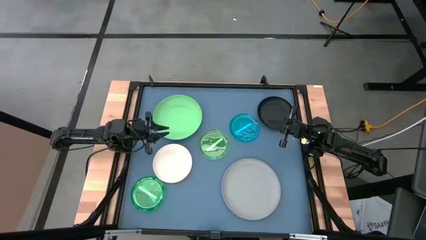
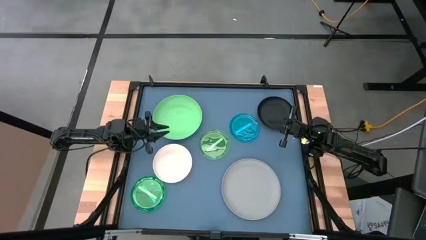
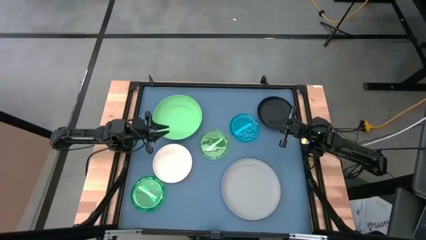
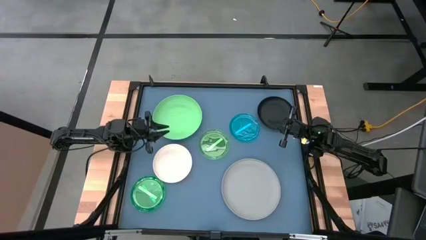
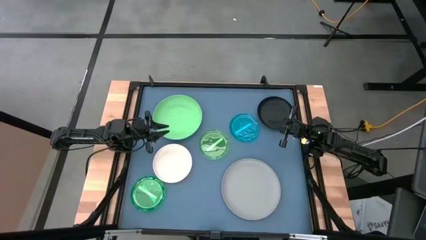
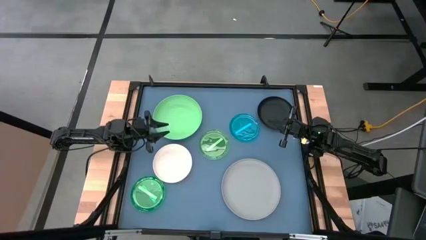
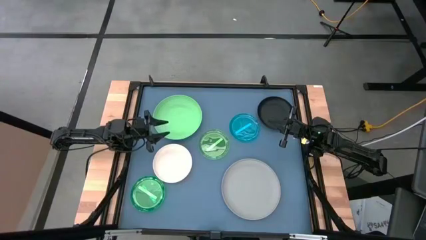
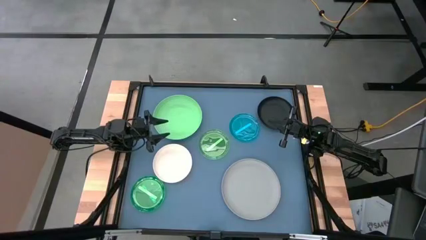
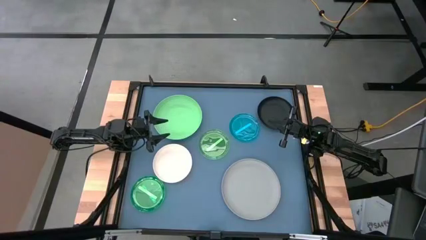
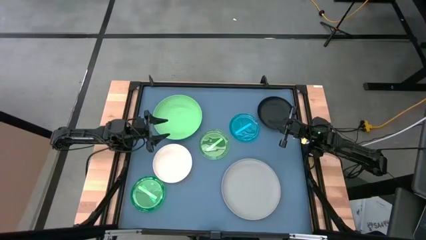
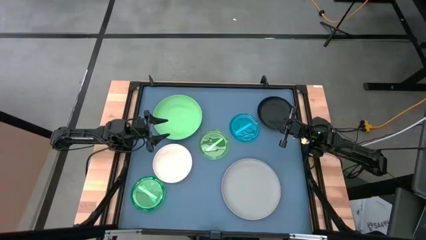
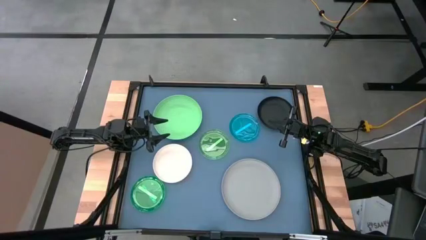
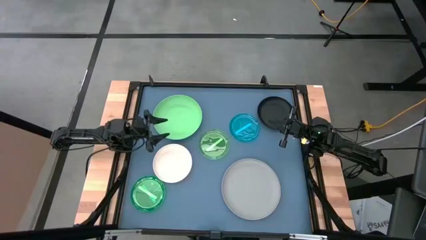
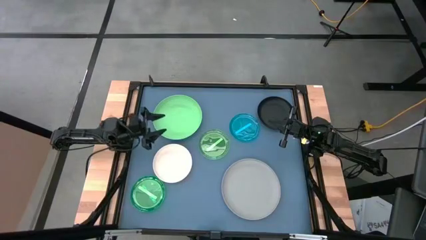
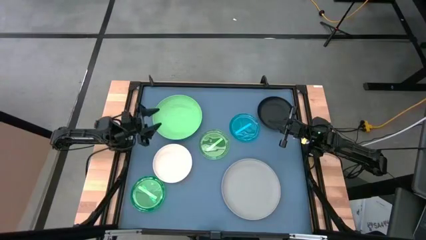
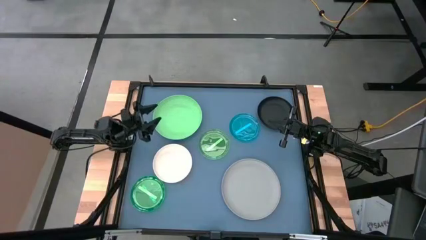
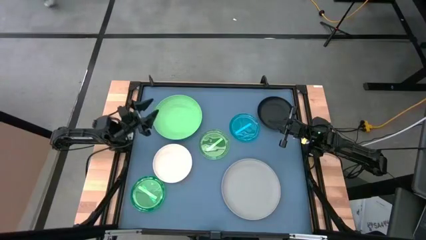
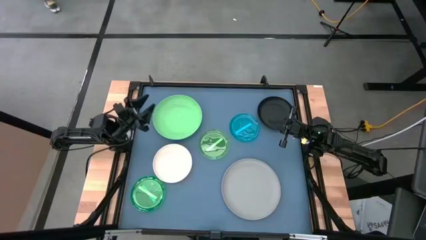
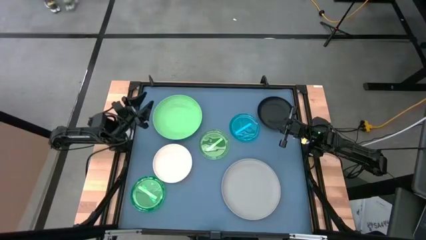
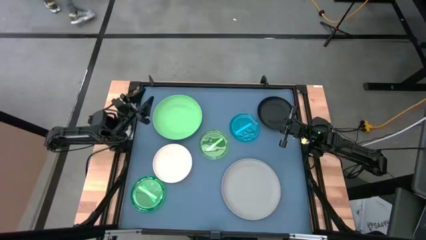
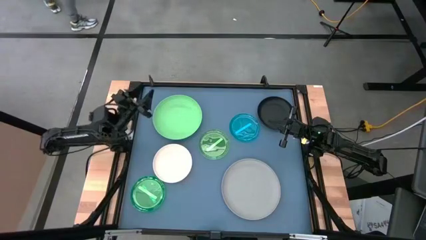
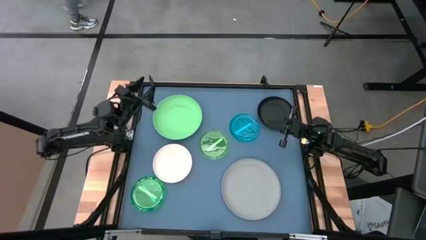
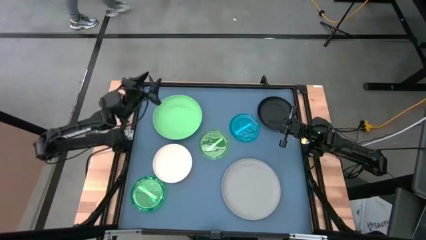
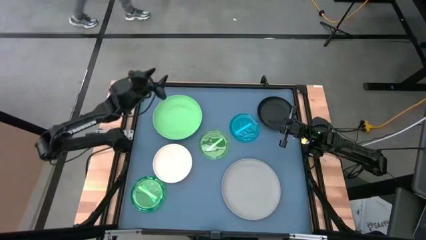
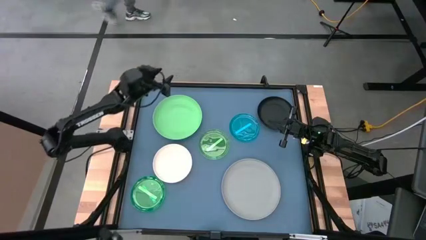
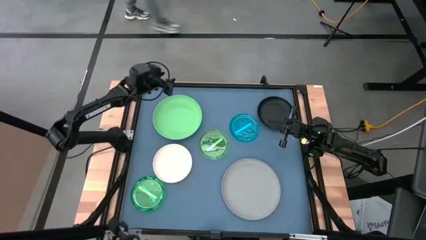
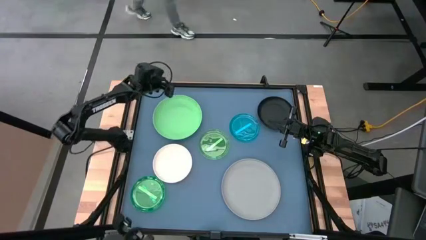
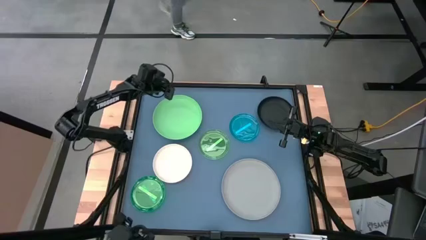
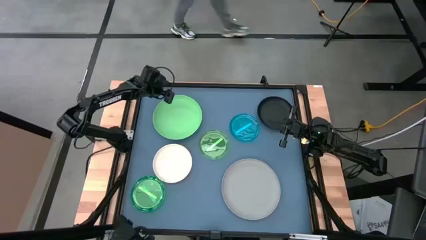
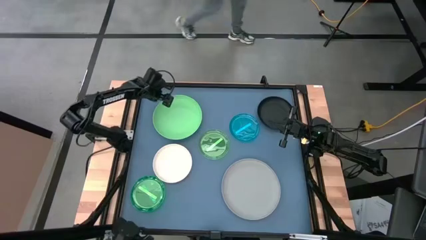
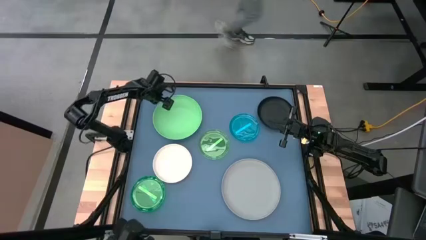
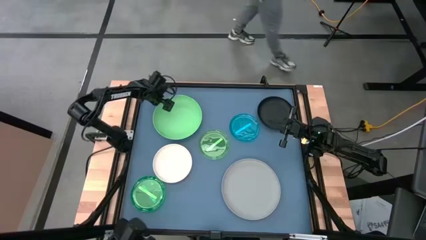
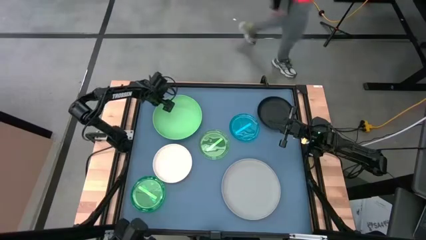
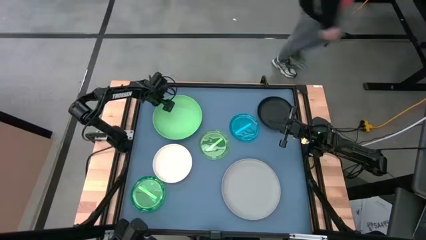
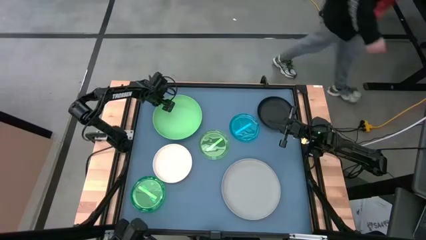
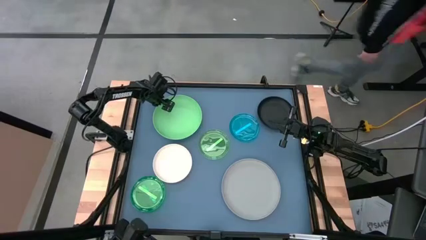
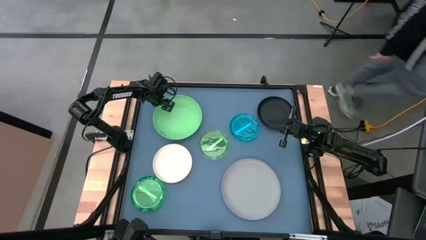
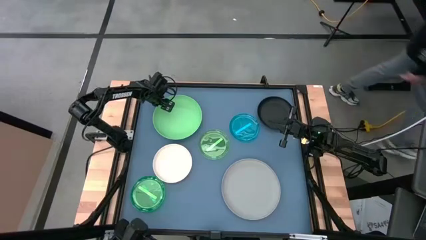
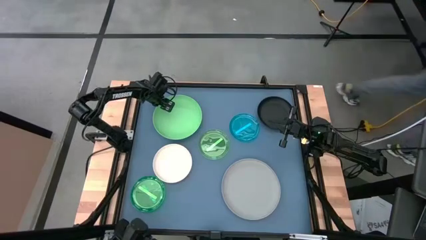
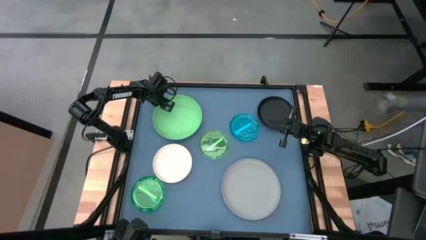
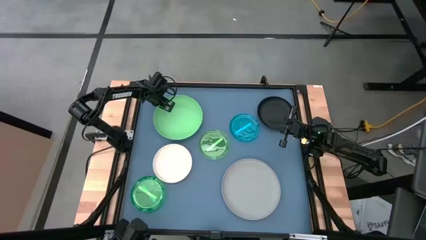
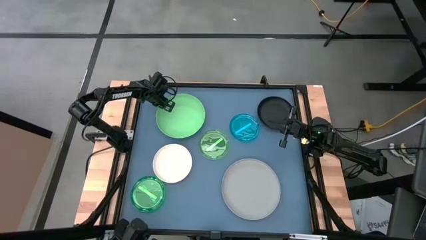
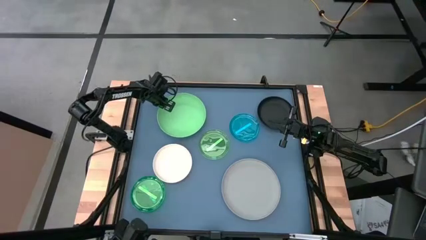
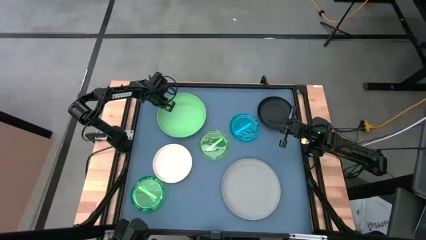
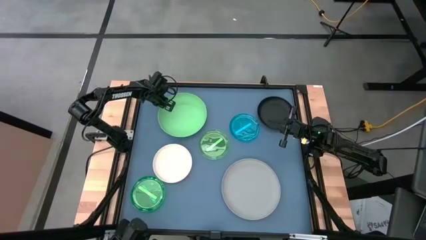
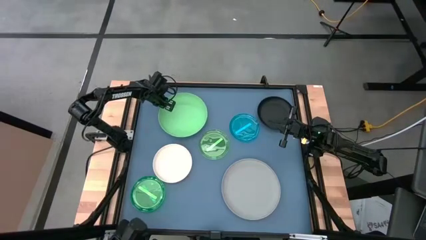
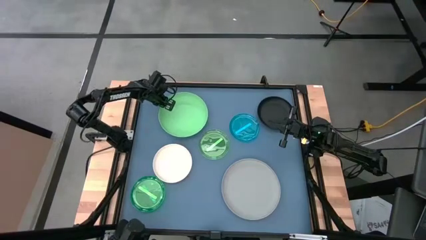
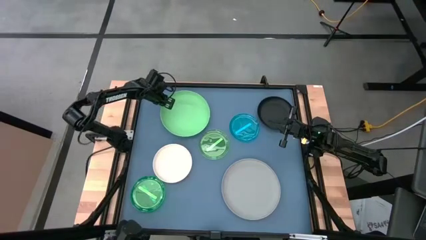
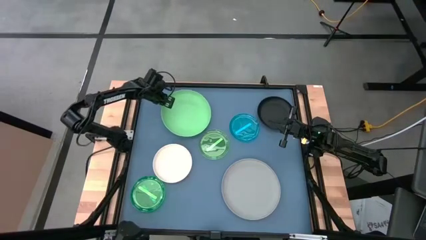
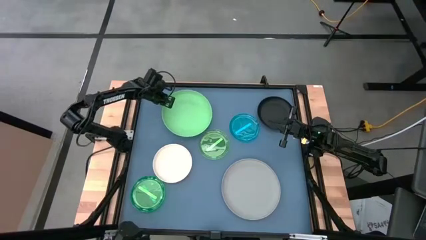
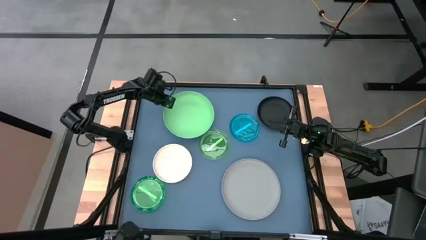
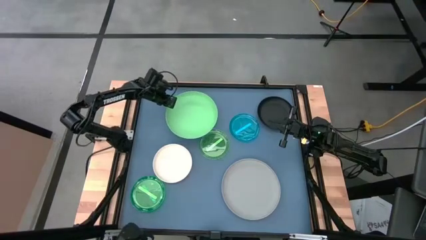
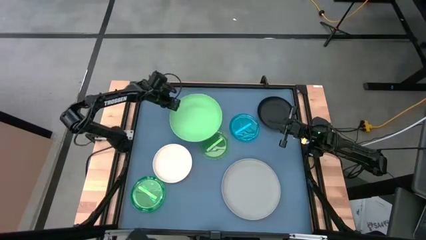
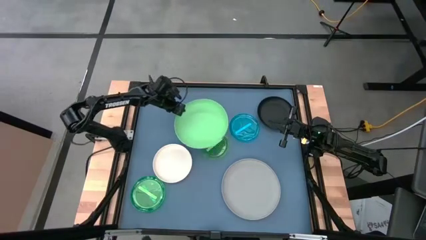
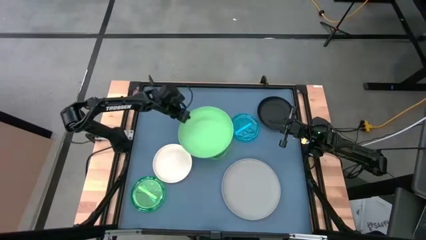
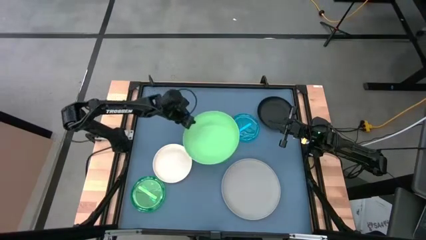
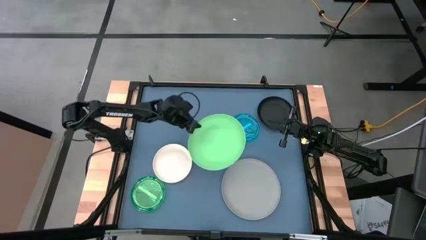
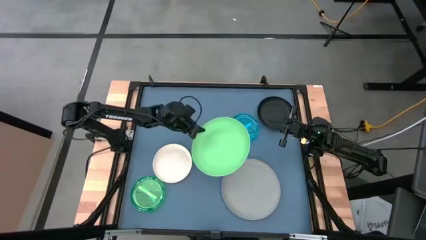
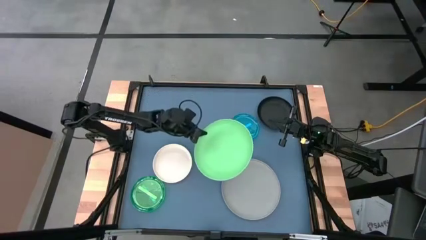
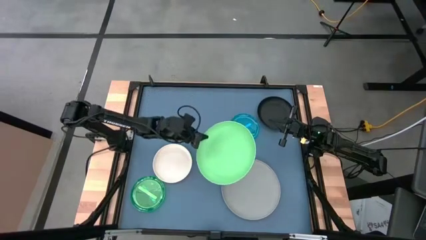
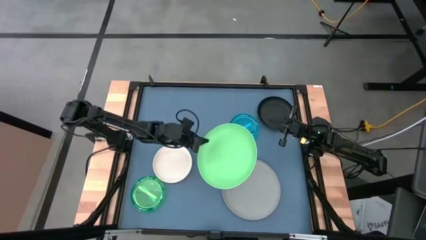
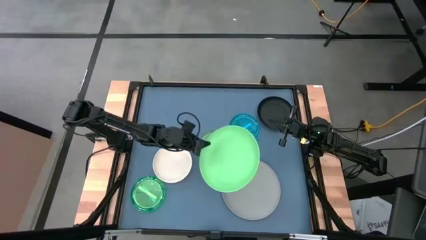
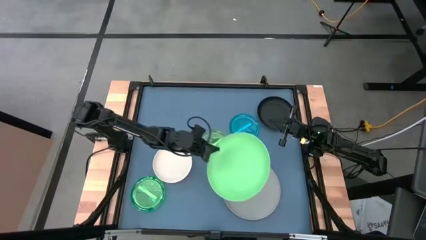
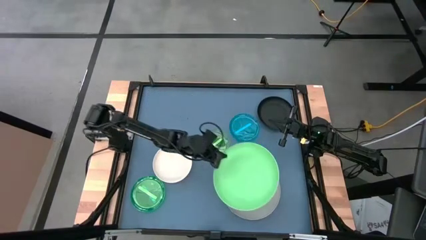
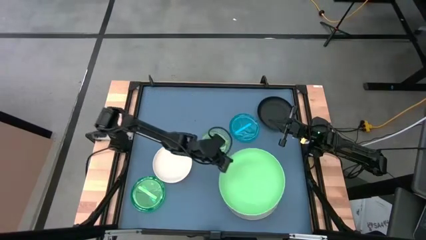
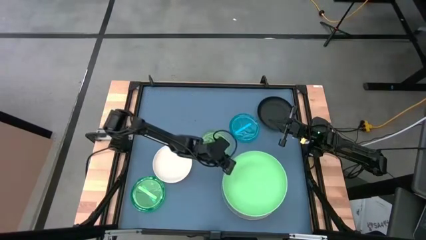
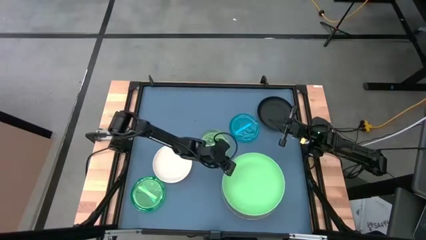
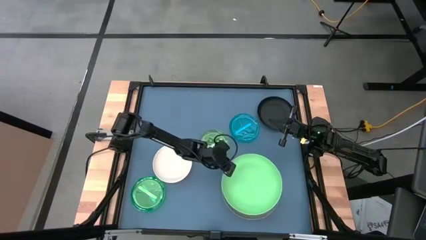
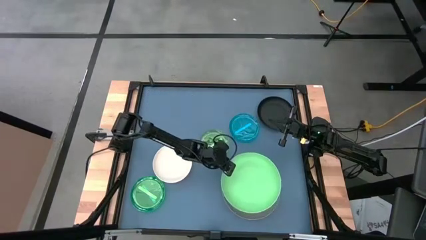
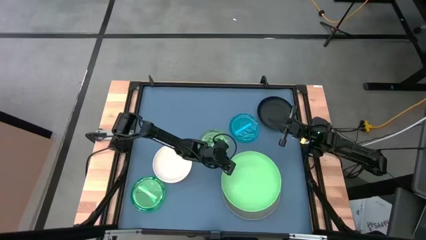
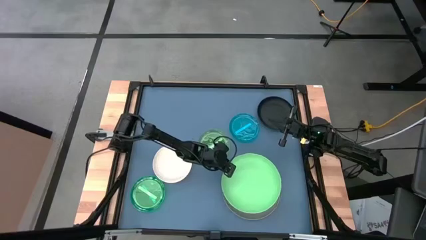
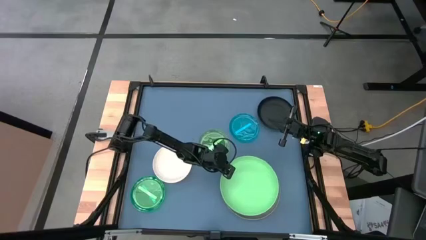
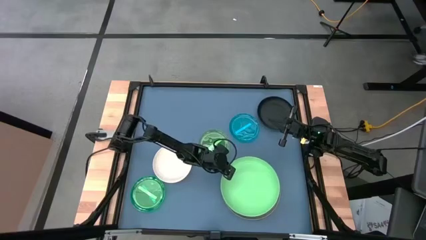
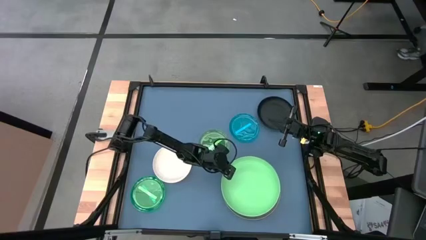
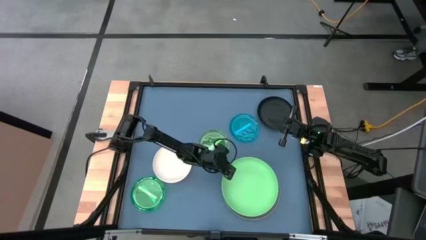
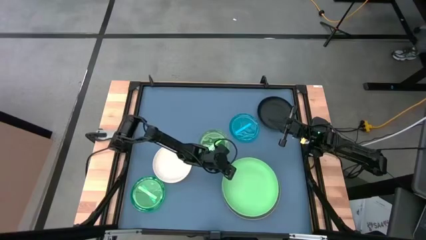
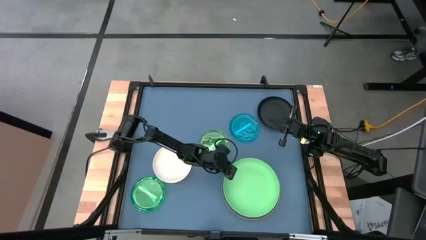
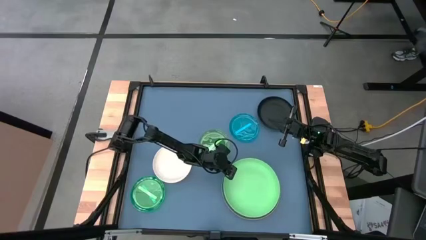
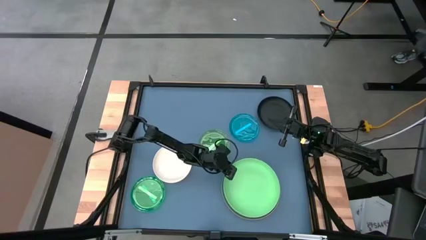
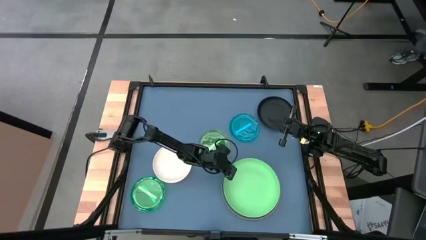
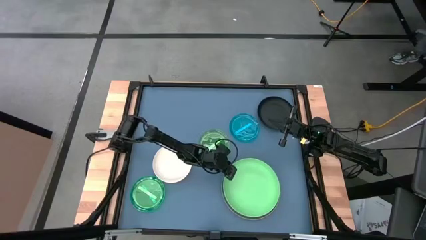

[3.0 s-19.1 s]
Task: Stack plastic plates
Stack the large green plate on top of the gray plate
